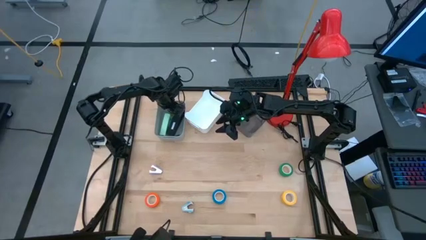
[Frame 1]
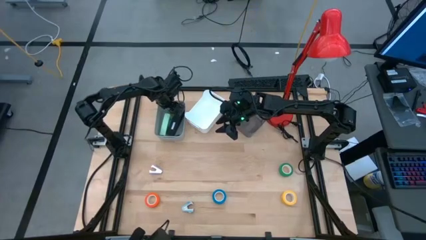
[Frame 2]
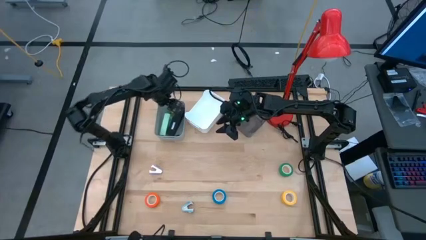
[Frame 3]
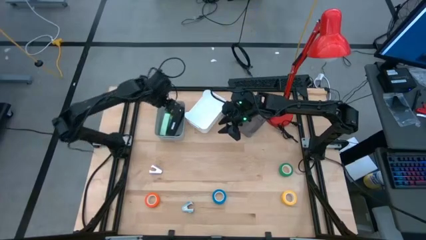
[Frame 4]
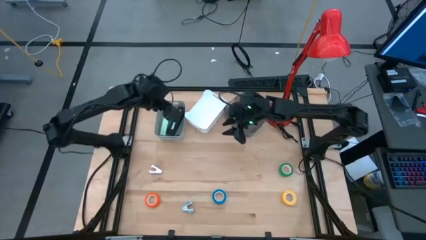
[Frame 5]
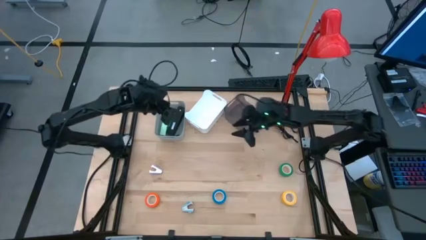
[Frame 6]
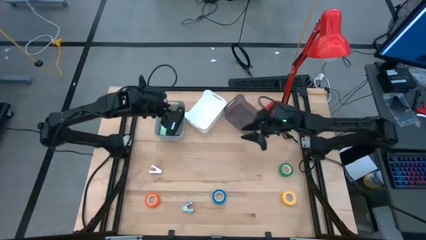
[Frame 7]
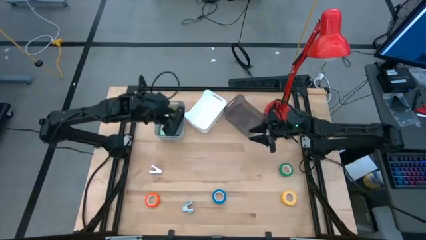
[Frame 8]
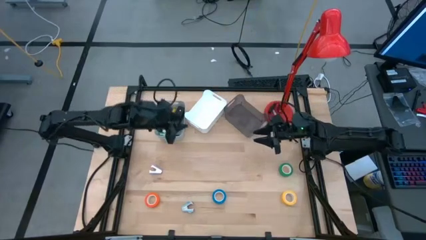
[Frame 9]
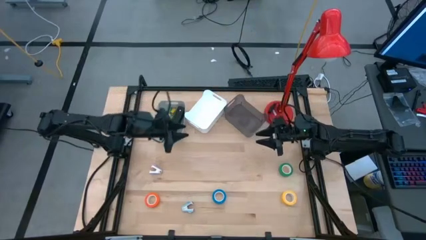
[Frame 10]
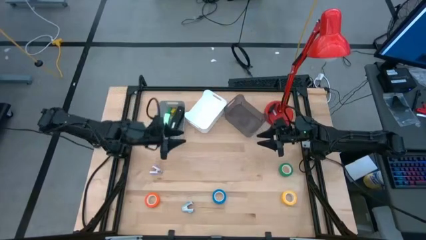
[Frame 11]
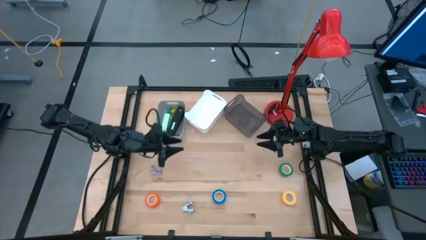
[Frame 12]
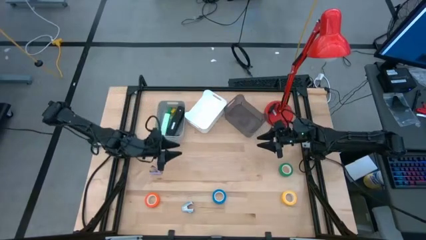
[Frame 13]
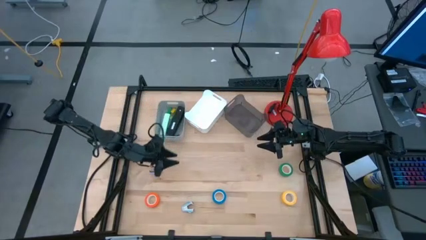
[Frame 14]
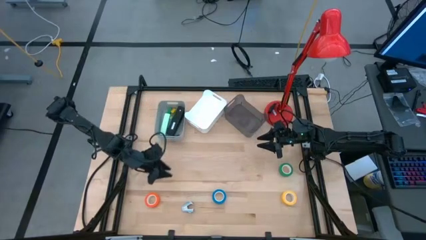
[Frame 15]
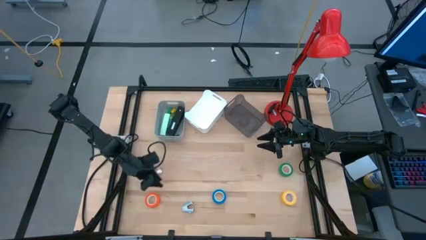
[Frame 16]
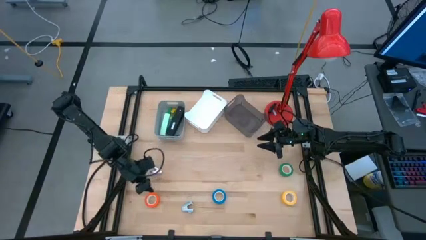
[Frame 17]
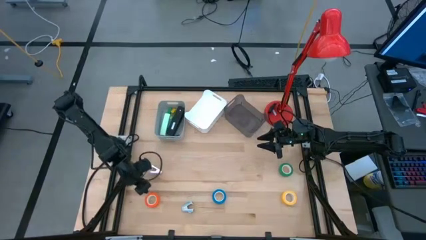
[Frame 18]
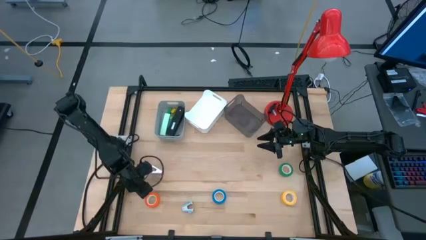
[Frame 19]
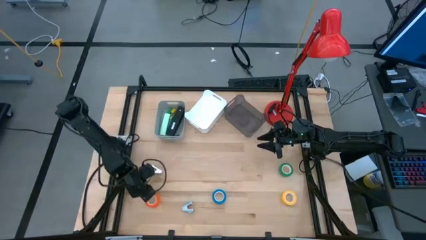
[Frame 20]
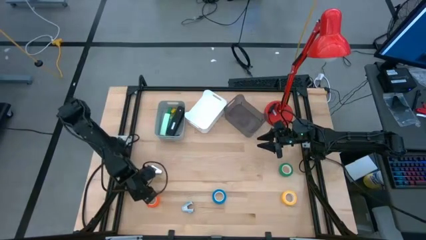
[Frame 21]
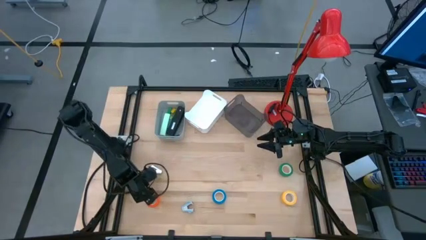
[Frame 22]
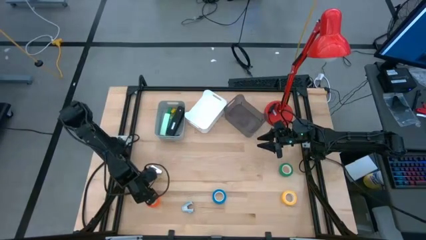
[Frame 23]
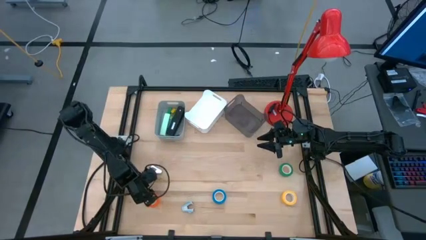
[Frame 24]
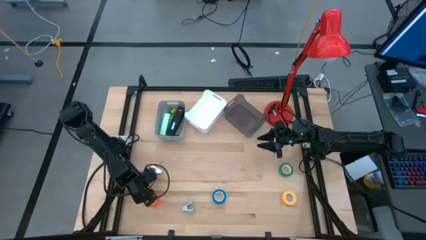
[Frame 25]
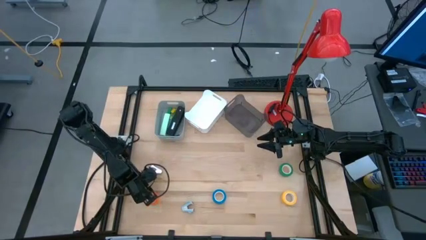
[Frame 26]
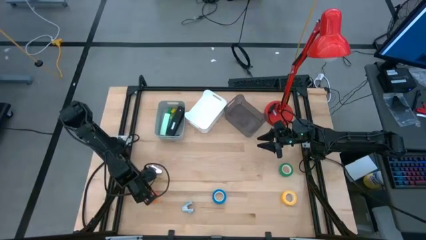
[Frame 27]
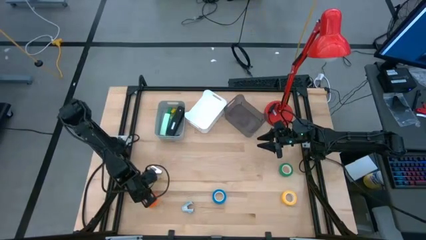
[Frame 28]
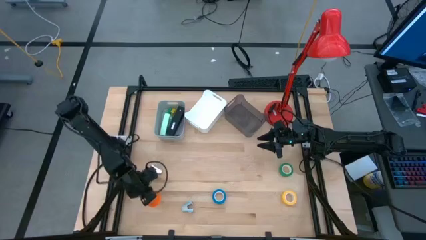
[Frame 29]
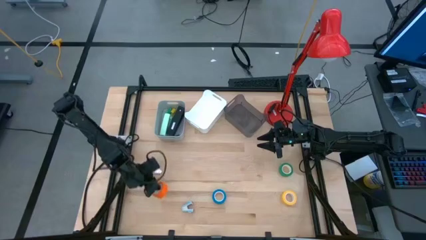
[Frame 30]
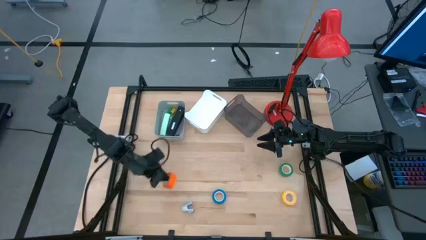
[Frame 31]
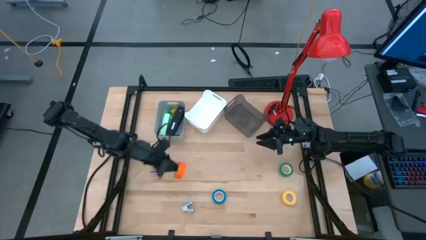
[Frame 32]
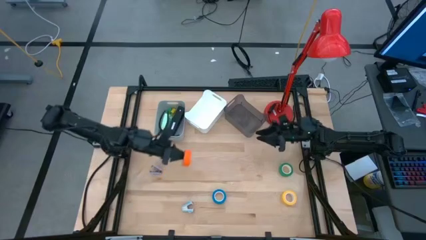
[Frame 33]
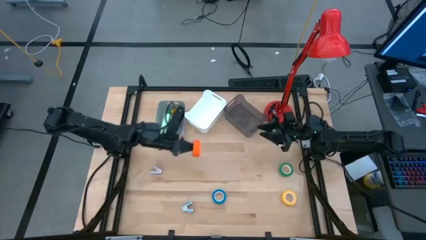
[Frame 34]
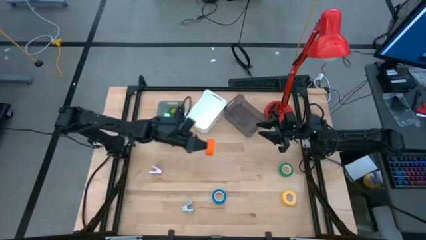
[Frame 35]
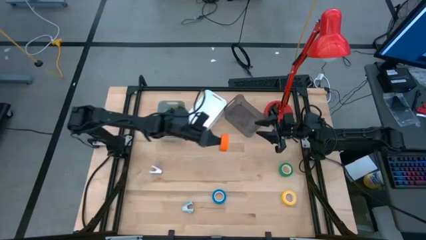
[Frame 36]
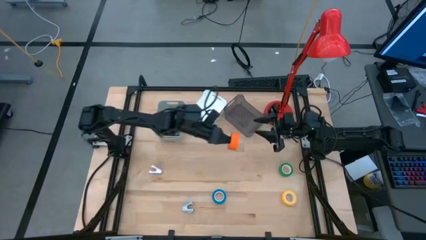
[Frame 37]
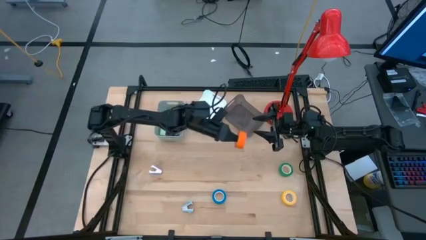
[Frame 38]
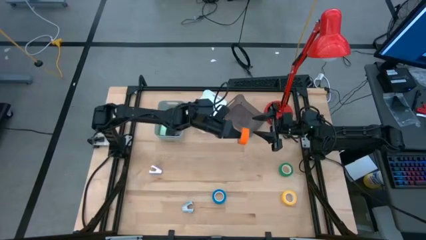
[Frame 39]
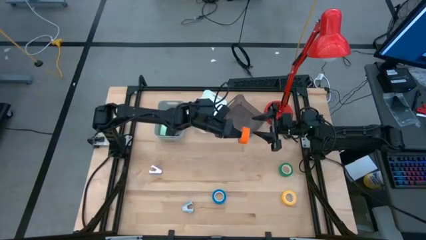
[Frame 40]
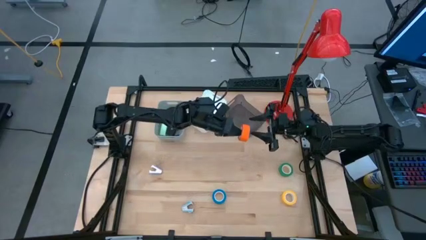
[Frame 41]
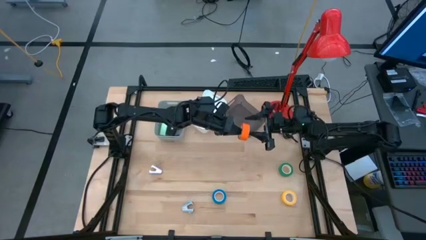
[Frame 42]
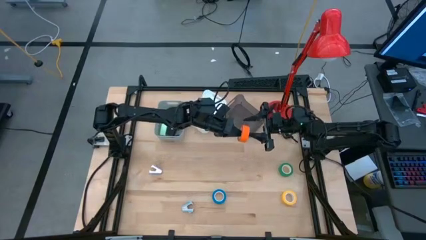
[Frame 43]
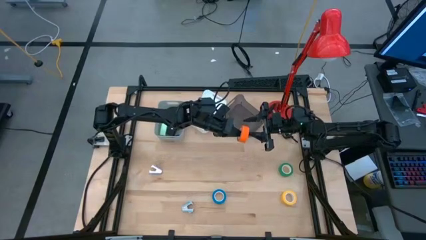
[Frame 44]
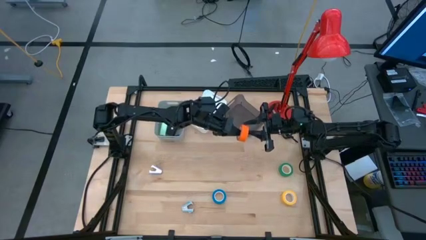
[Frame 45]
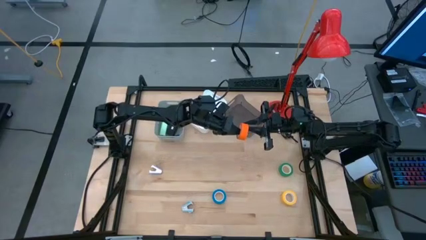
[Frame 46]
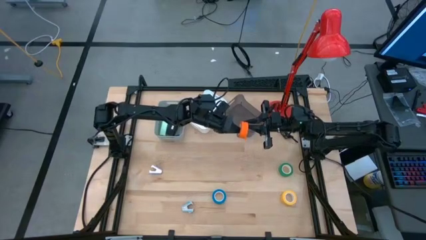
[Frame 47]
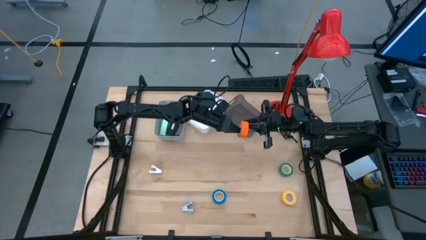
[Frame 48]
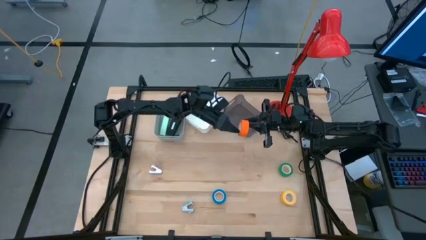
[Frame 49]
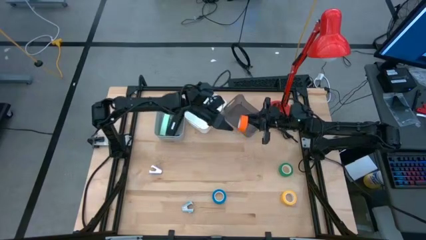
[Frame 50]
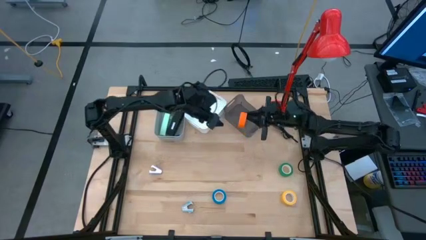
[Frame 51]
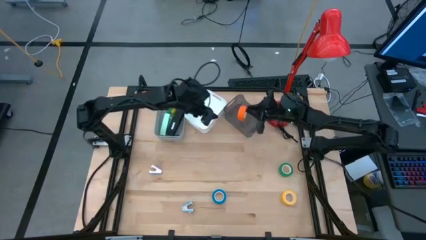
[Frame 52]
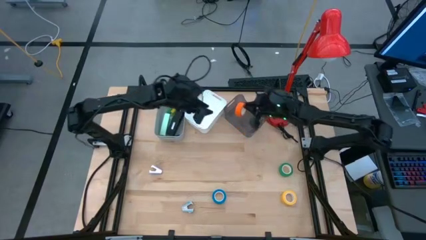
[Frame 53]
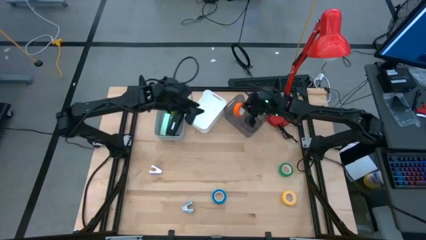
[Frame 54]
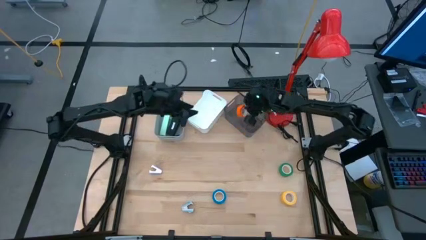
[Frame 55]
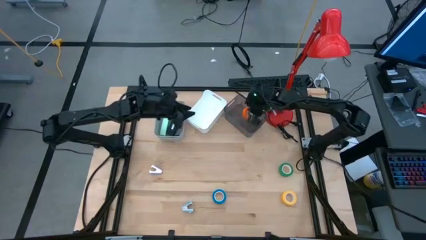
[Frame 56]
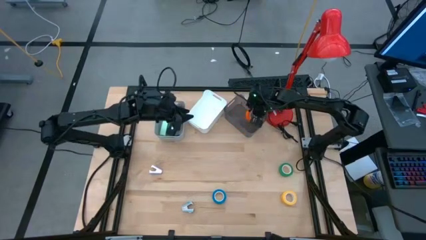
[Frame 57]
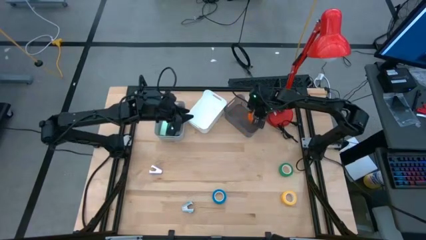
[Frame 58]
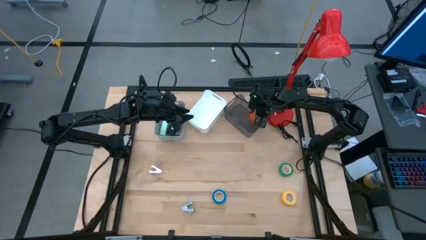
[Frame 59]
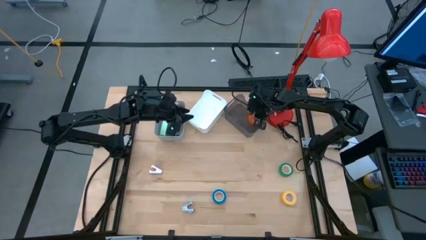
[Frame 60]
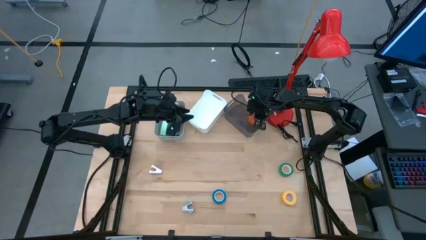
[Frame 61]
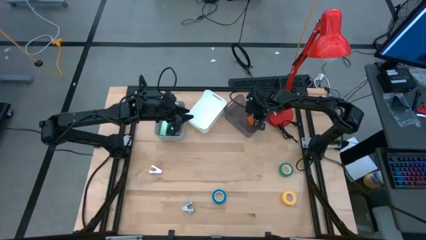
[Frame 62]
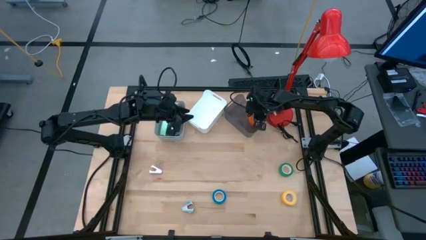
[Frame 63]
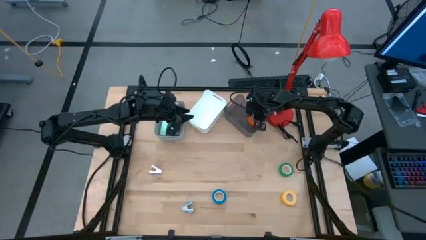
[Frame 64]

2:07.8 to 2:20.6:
Task: Pick and place Stapler, Stapler remover, tape
Put the orange tape into the black bin
